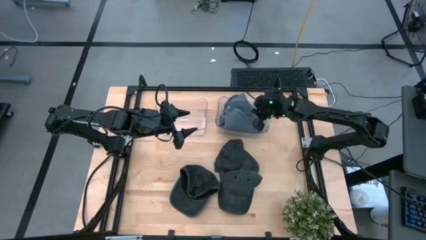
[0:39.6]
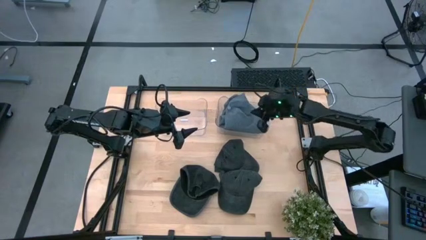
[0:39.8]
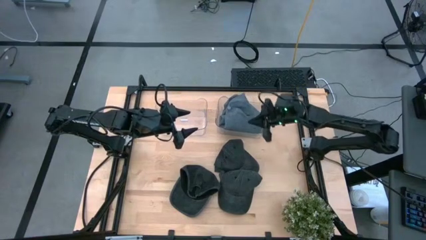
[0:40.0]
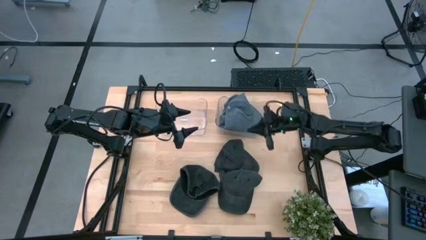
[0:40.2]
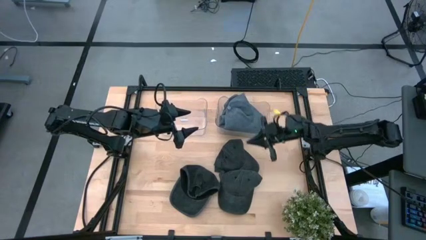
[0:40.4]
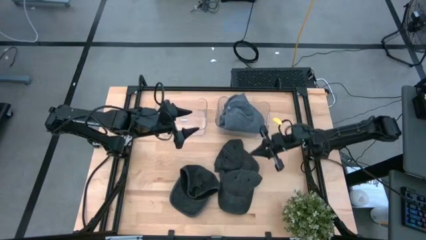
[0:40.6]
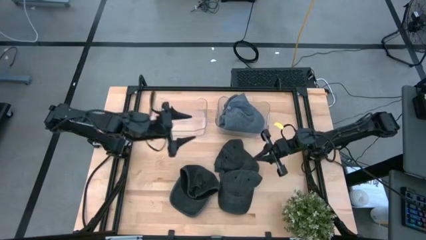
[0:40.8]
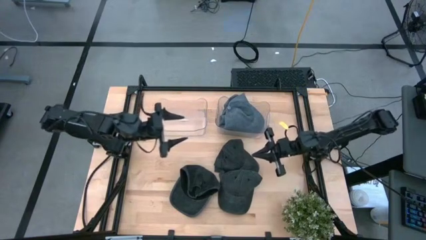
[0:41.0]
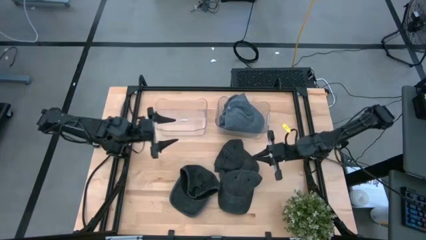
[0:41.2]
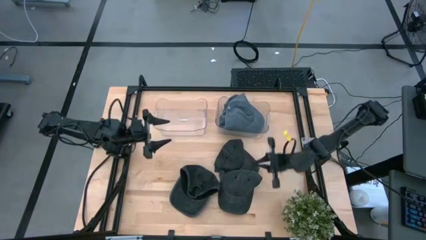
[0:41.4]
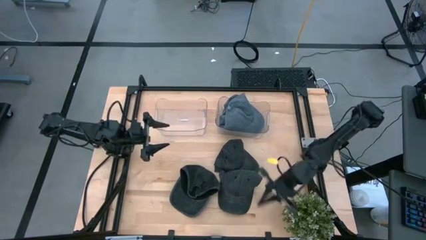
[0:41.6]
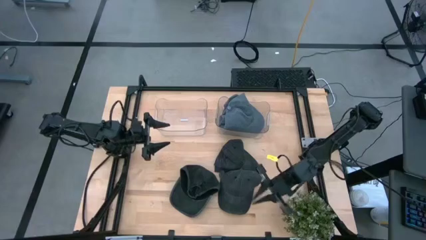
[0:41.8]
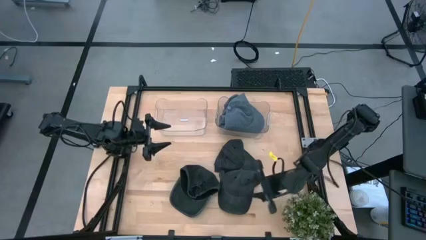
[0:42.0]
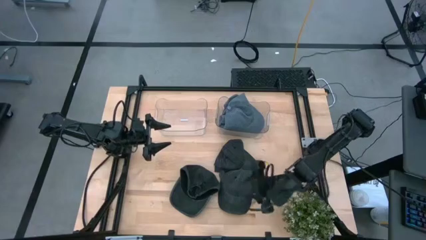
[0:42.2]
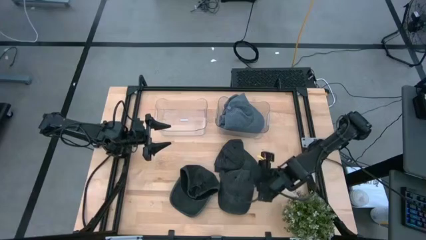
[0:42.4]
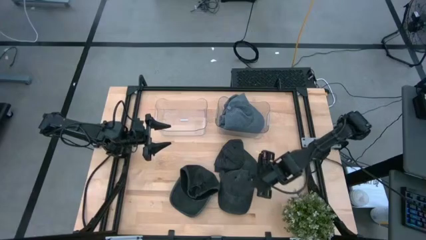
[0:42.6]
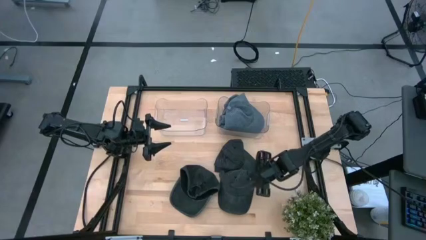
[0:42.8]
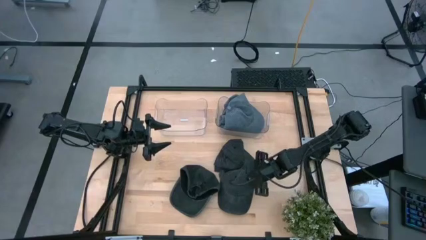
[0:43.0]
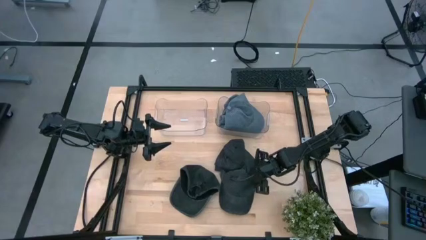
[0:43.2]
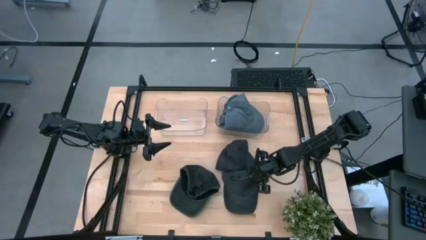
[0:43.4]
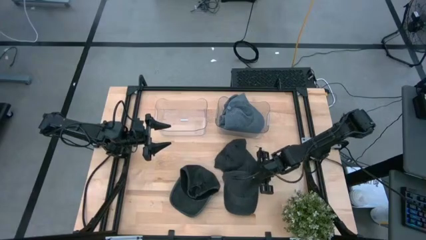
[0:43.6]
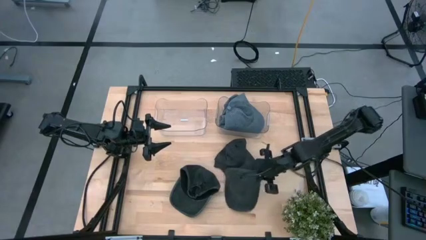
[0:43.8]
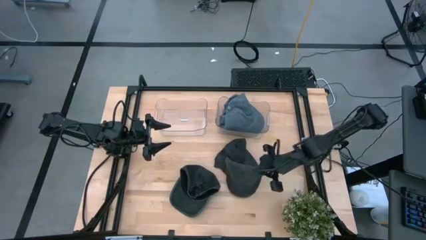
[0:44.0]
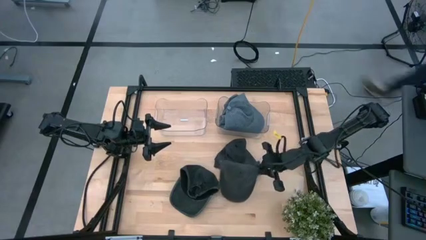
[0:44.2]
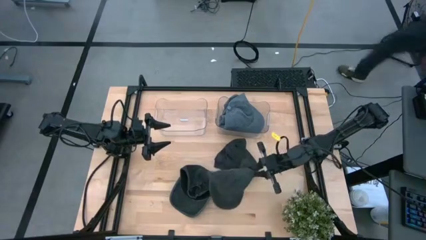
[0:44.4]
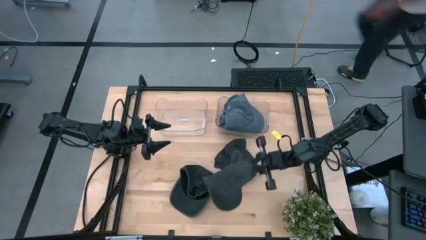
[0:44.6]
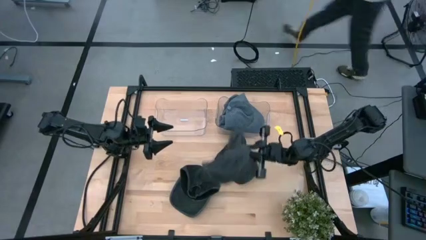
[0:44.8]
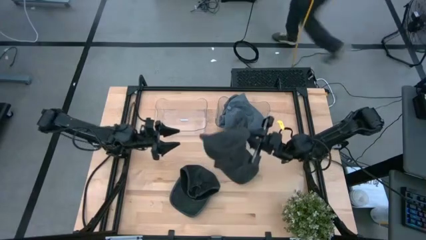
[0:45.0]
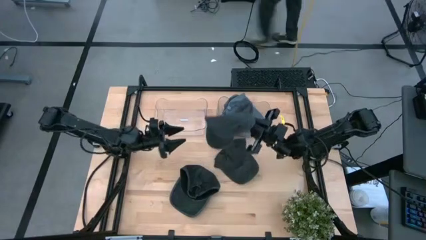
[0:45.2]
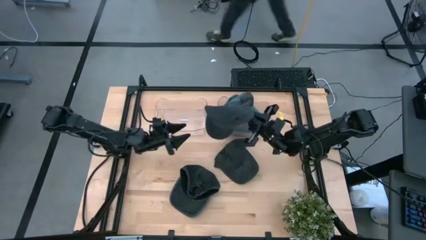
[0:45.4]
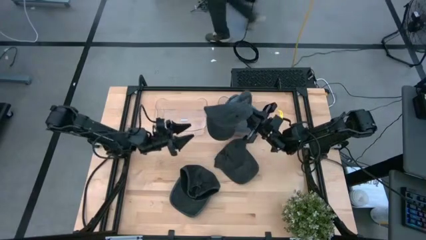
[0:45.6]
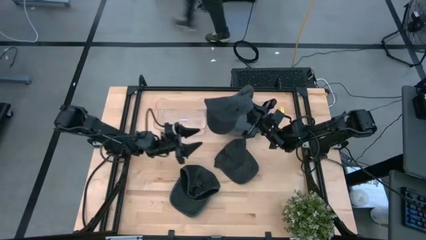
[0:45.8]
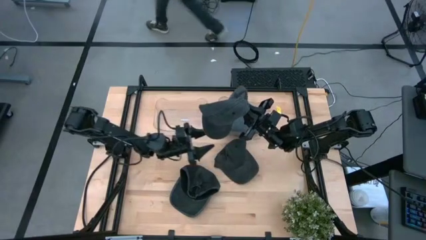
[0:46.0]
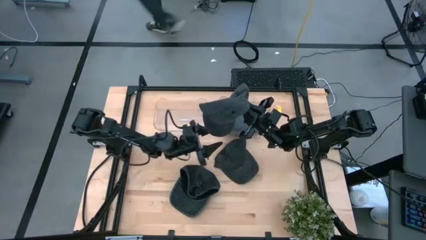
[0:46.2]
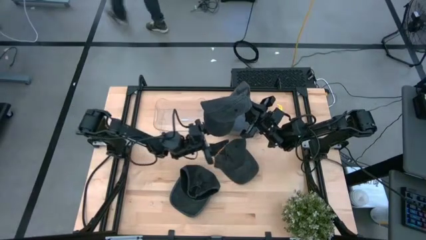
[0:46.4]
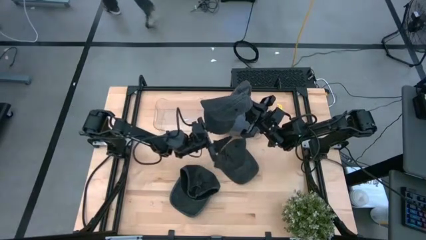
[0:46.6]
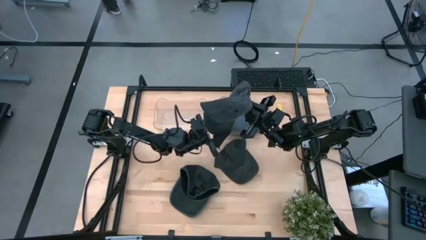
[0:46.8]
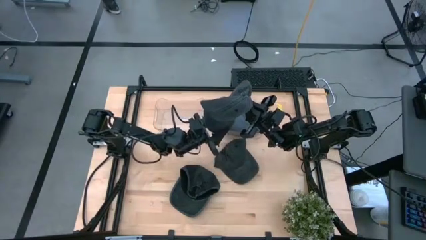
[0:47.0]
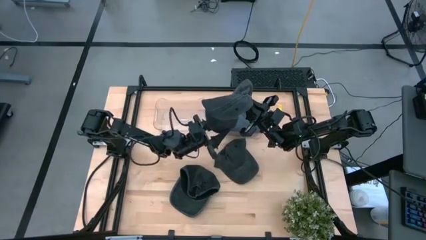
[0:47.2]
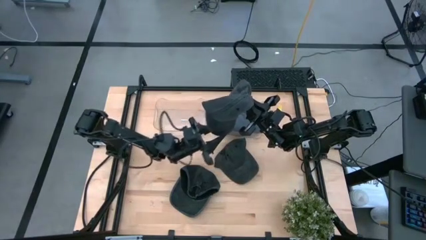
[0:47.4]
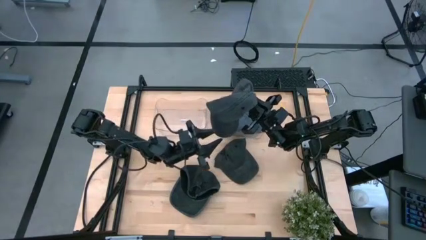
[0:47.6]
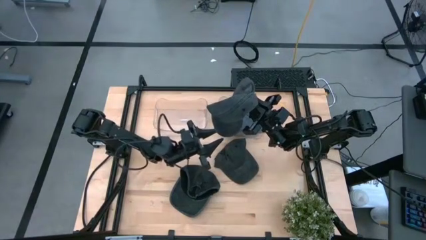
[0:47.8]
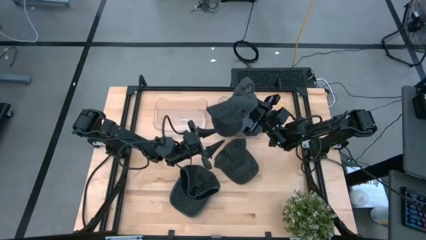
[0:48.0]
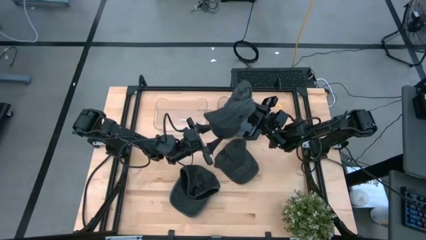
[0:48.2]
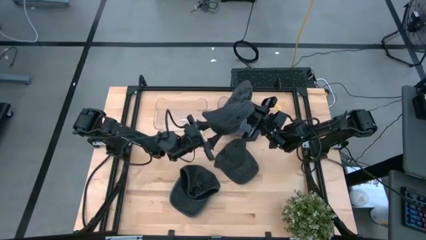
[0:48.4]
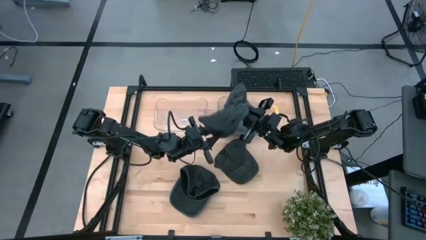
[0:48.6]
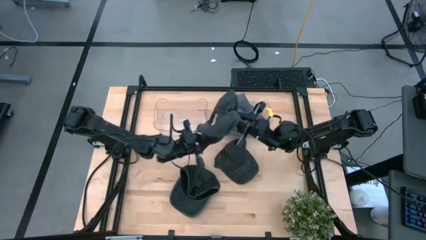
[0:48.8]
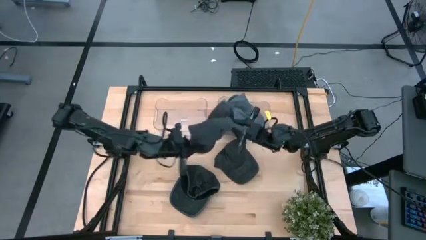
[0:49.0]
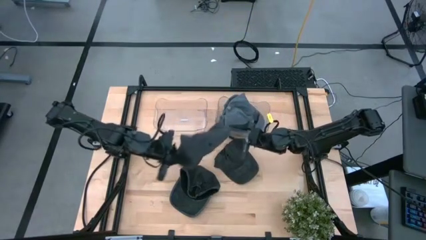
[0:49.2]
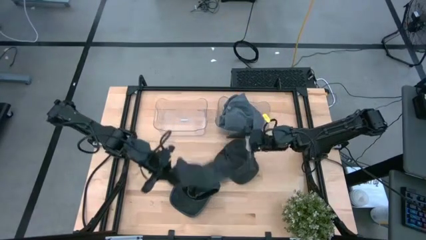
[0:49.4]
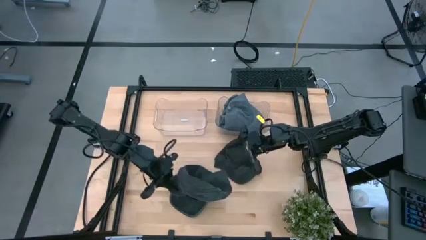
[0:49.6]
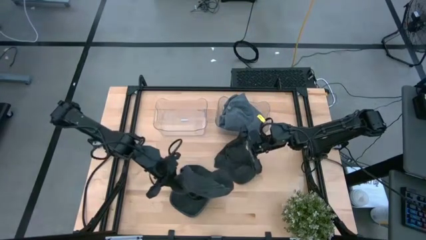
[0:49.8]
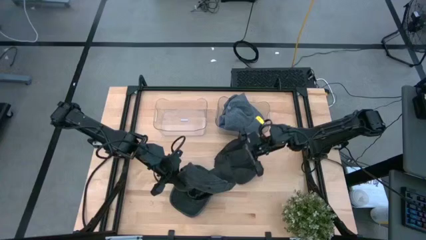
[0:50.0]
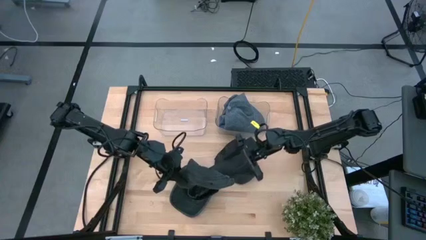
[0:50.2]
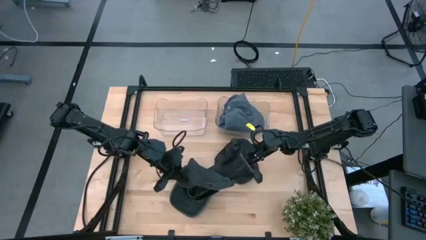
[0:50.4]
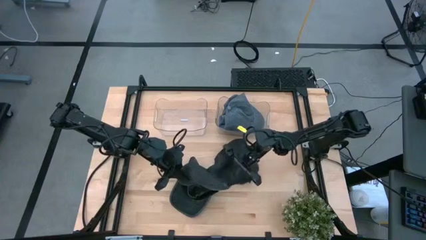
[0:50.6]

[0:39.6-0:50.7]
Task: Pick & Place hat
Put the bottom right black cap into the left transparent bin

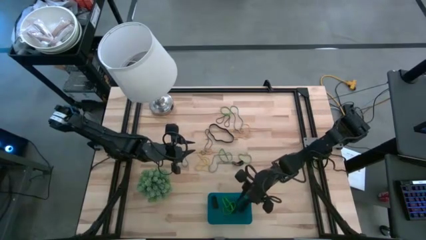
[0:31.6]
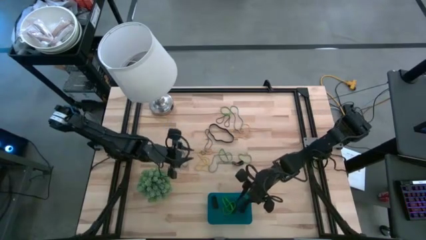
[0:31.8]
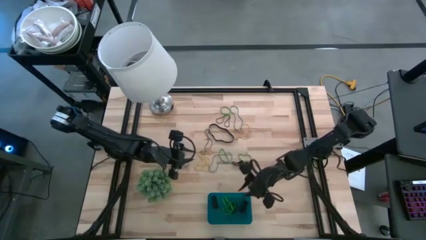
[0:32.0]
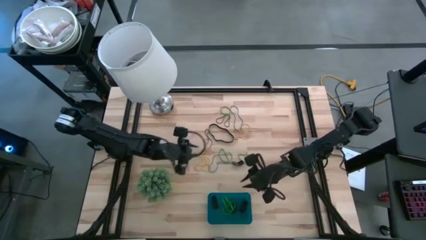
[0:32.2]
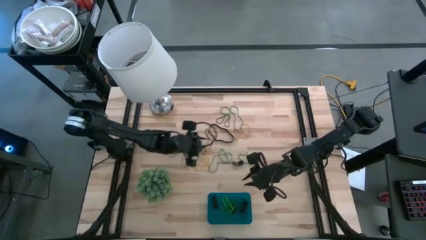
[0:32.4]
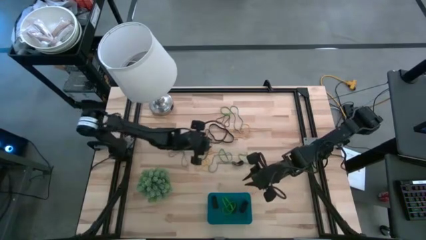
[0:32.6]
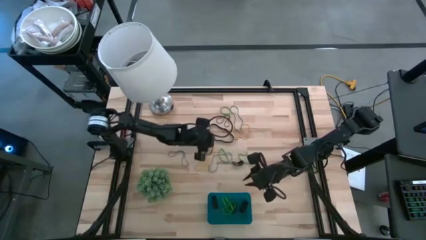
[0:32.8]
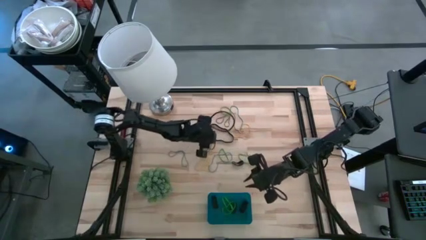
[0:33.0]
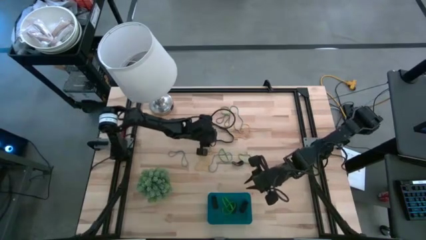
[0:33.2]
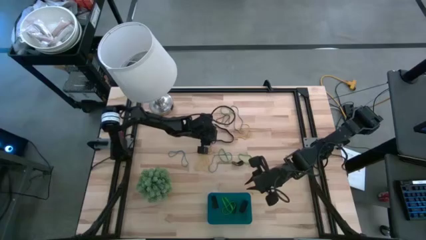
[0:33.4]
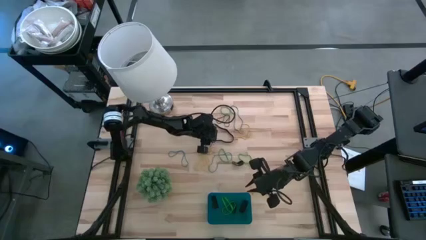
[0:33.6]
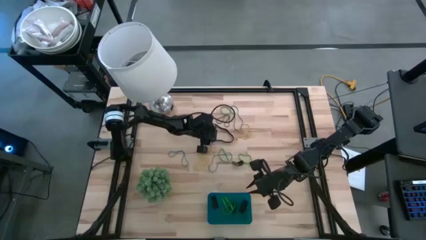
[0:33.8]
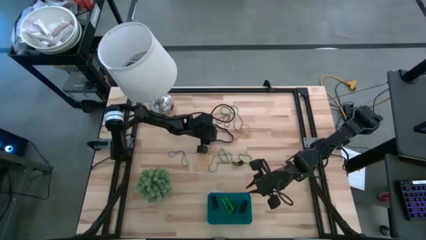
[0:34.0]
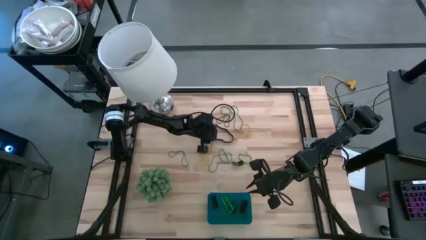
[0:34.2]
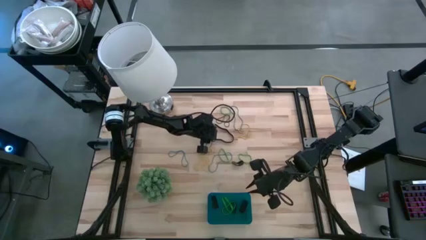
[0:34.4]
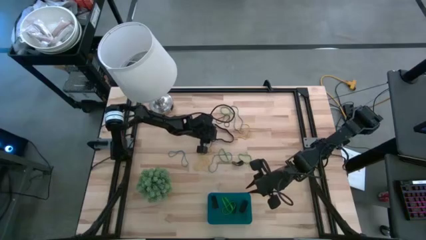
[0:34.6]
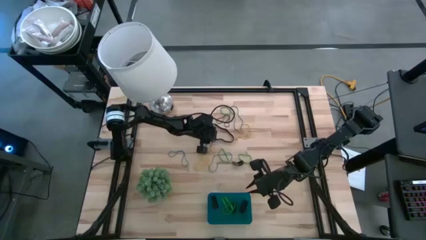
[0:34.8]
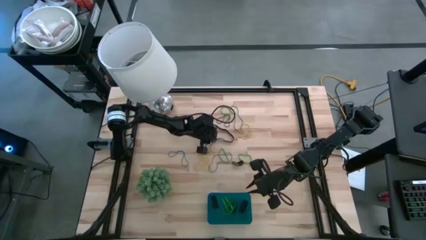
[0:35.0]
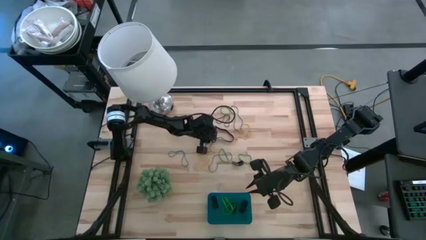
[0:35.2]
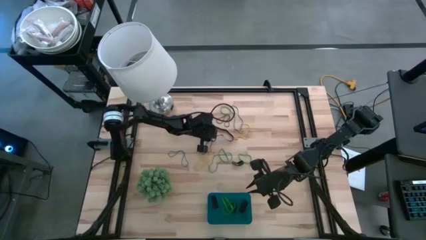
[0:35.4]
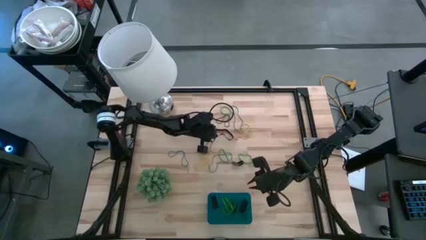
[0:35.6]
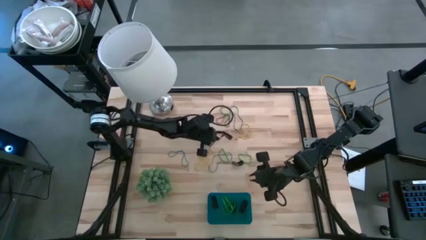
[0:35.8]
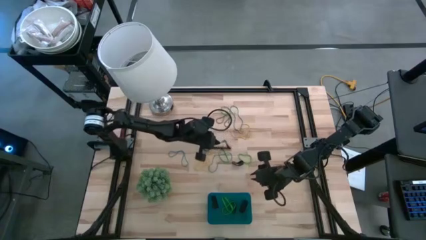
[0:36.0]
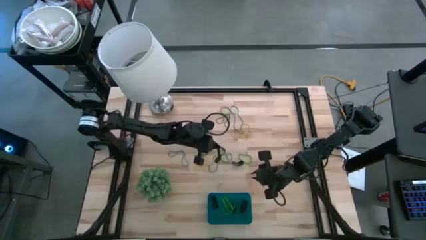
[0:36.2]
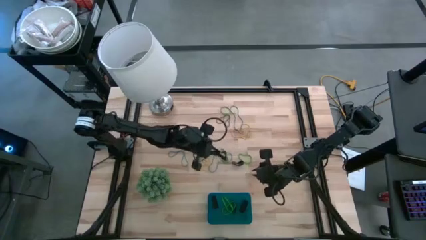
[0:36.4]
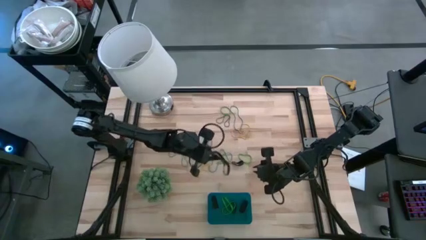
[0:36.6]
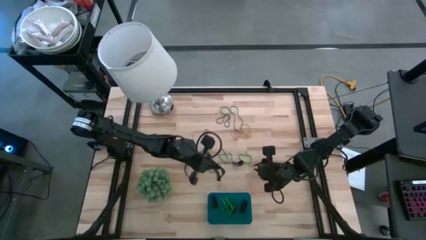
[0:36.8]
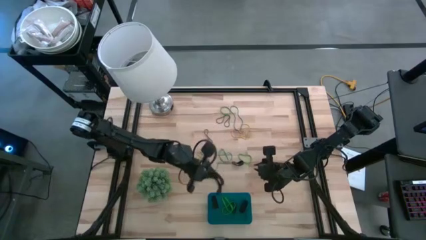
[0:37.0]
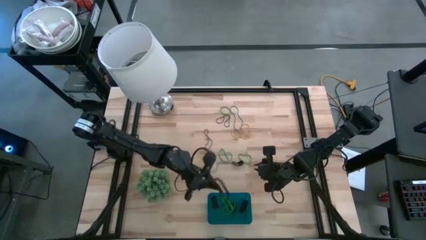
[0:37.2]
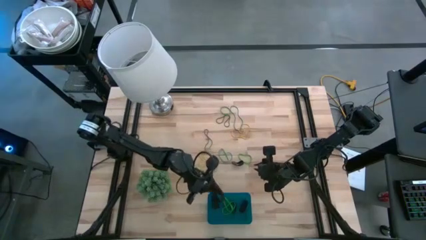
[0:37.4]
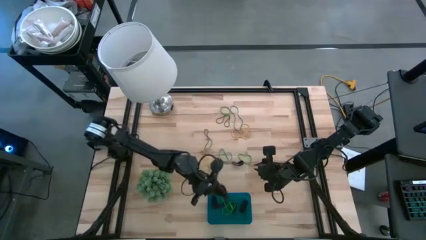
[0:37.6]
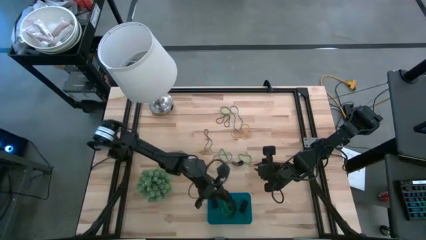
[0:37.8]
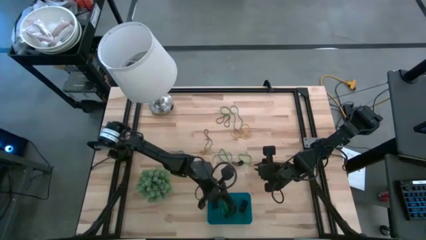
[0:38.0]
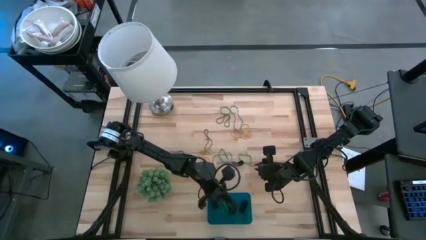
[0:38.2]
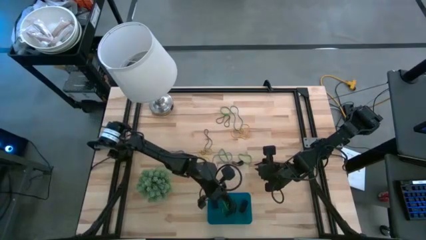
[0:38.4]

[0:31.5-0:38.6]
Task: Pick and place rubber bands into bin
Put the black rubber band into the blue bin
